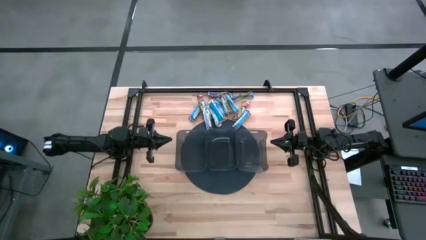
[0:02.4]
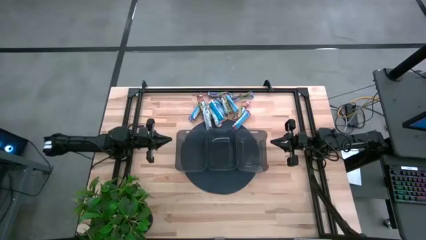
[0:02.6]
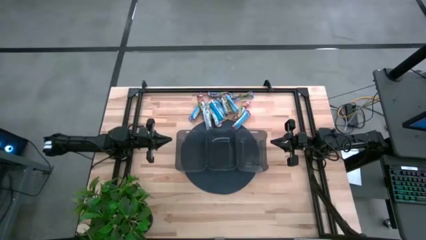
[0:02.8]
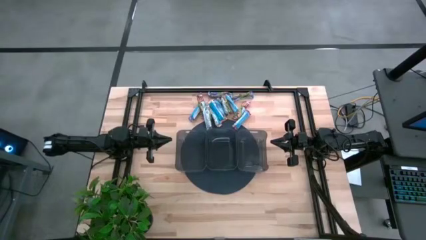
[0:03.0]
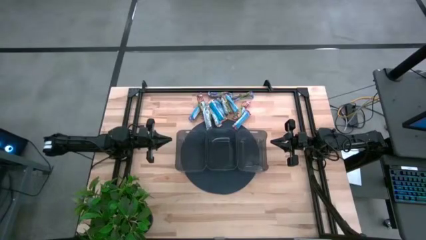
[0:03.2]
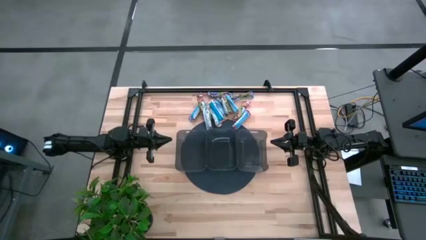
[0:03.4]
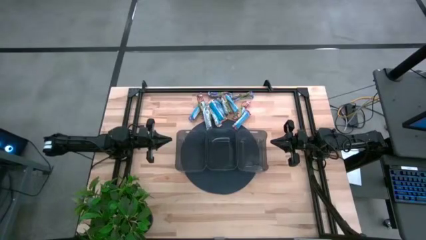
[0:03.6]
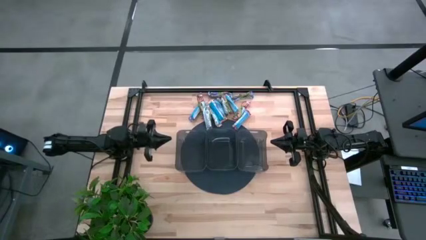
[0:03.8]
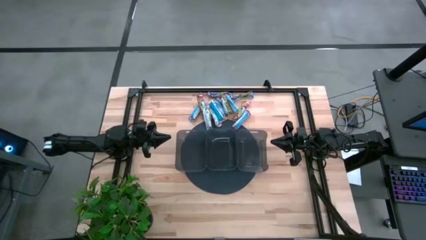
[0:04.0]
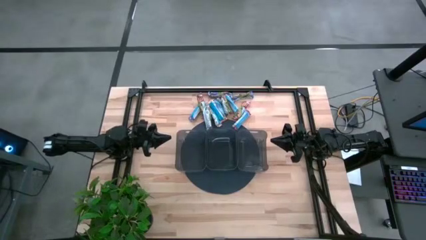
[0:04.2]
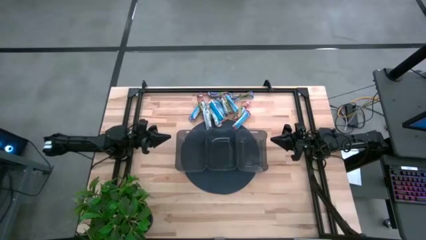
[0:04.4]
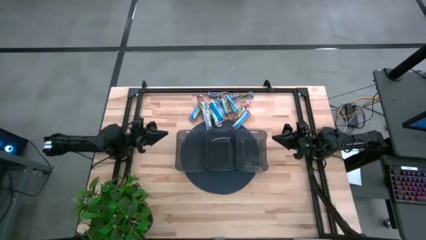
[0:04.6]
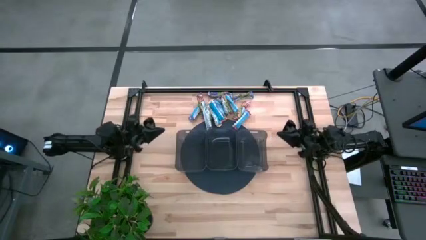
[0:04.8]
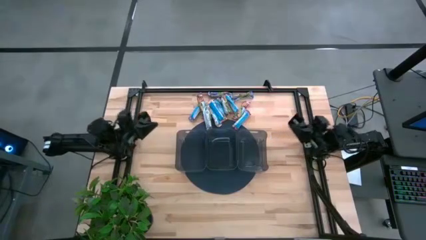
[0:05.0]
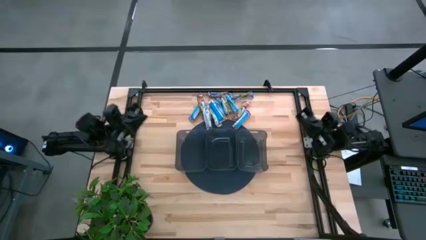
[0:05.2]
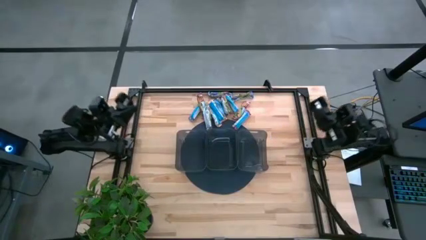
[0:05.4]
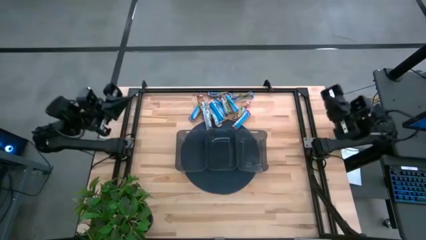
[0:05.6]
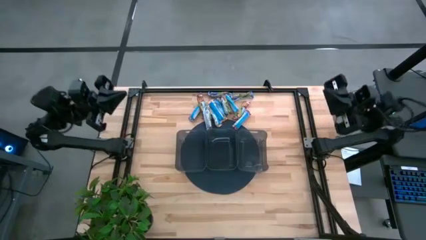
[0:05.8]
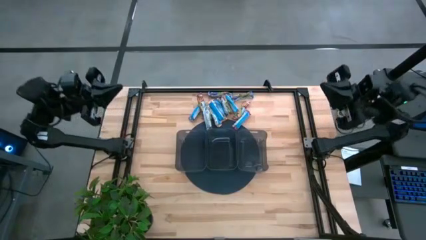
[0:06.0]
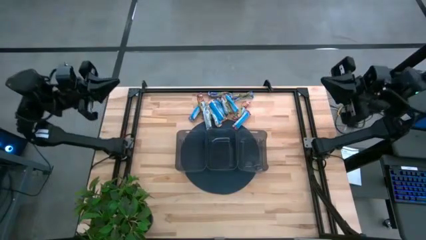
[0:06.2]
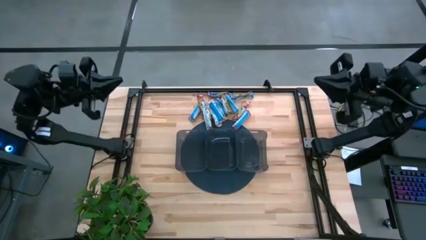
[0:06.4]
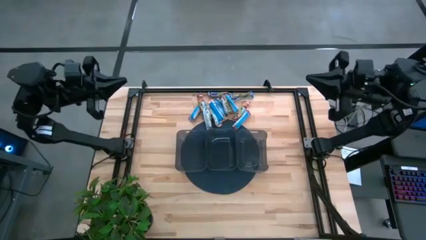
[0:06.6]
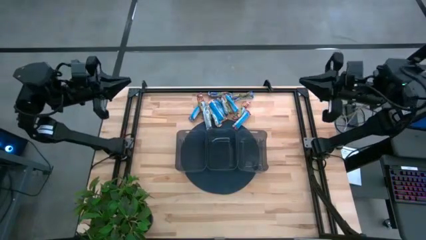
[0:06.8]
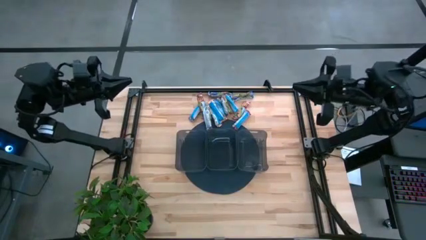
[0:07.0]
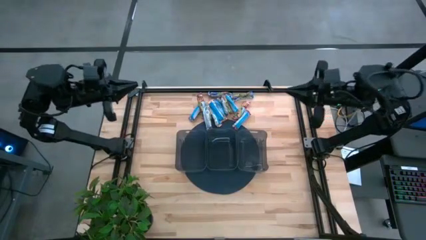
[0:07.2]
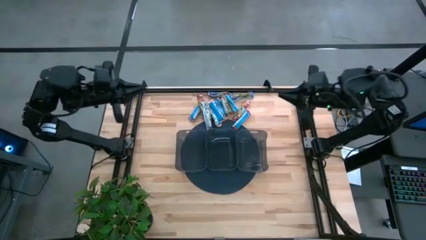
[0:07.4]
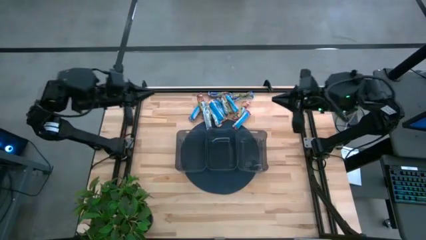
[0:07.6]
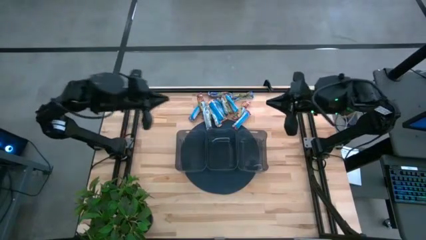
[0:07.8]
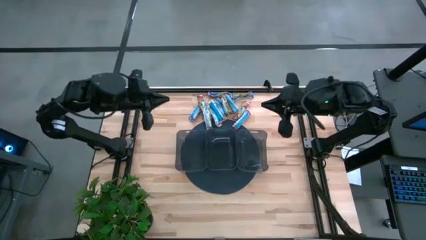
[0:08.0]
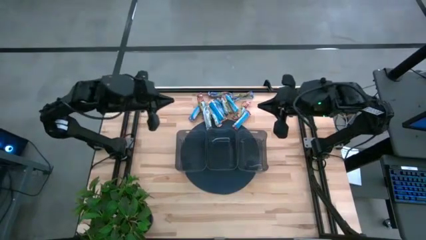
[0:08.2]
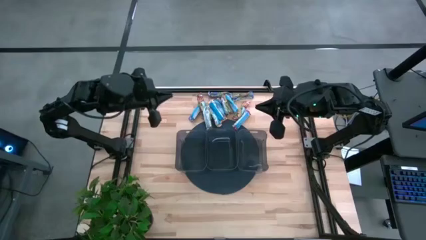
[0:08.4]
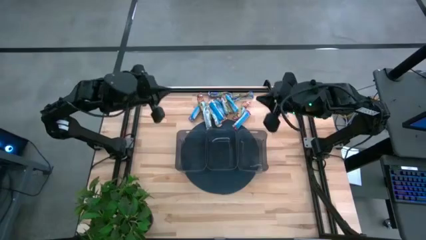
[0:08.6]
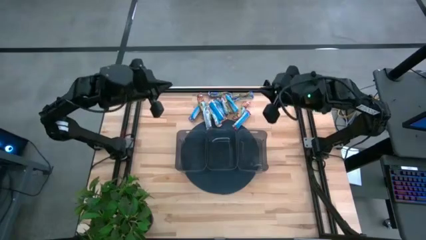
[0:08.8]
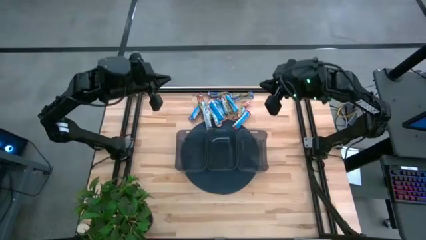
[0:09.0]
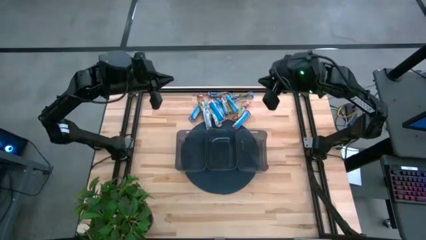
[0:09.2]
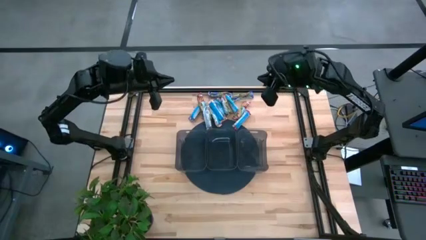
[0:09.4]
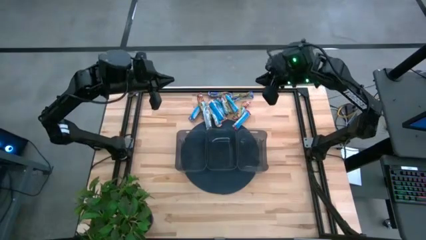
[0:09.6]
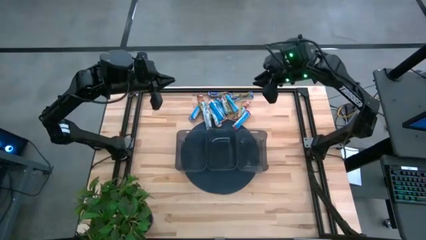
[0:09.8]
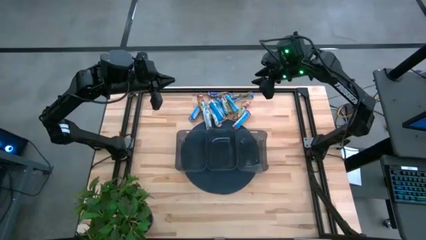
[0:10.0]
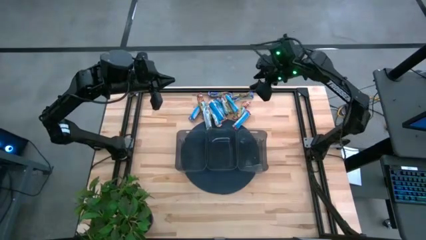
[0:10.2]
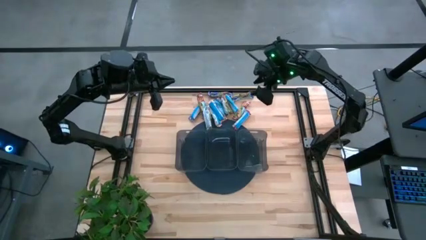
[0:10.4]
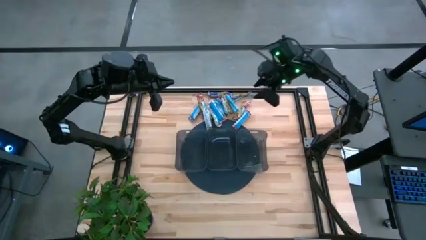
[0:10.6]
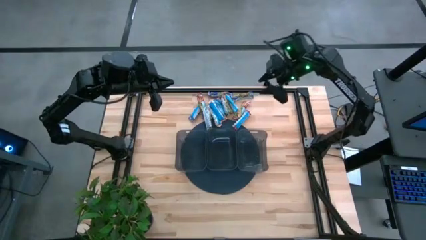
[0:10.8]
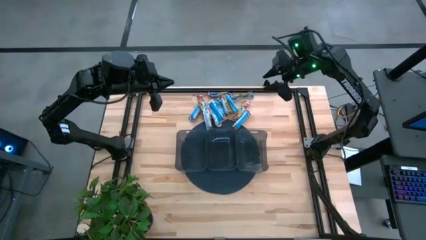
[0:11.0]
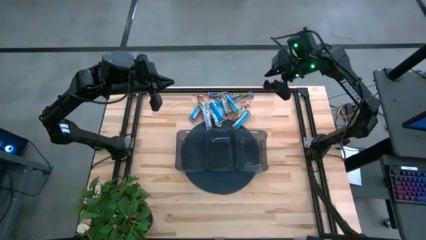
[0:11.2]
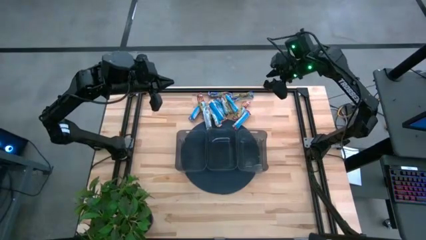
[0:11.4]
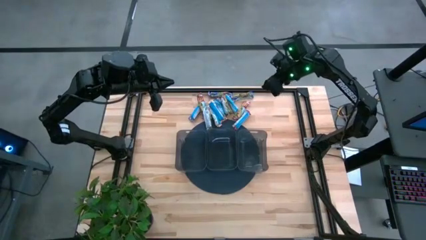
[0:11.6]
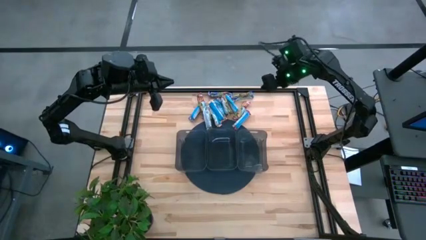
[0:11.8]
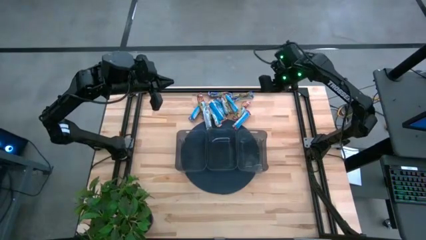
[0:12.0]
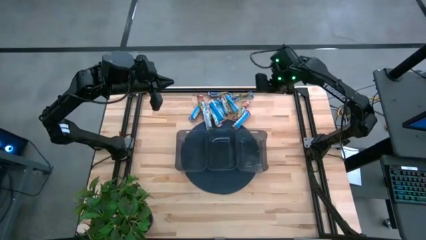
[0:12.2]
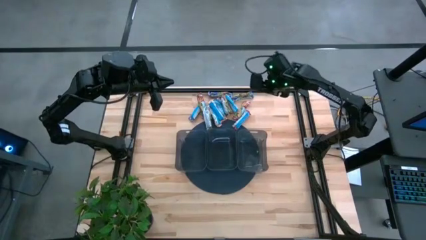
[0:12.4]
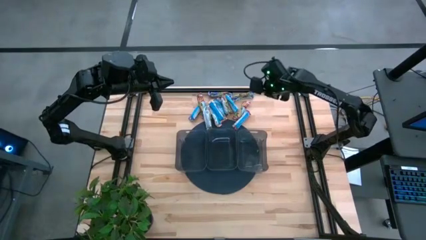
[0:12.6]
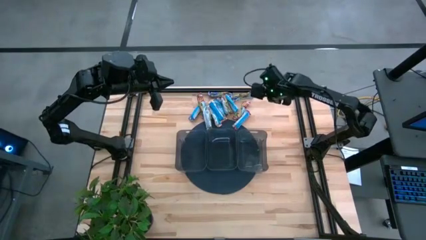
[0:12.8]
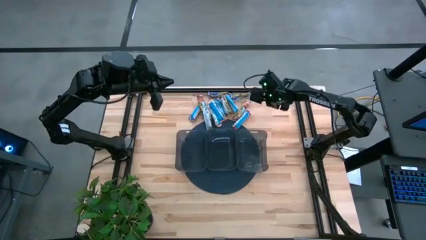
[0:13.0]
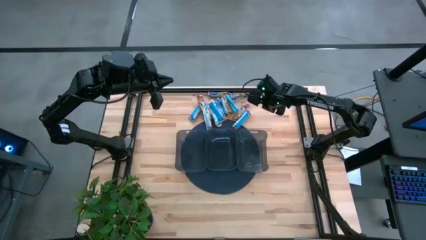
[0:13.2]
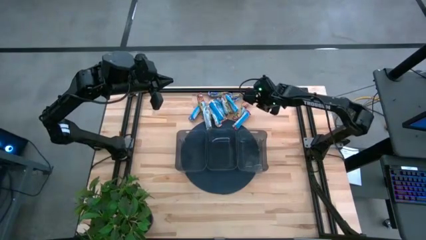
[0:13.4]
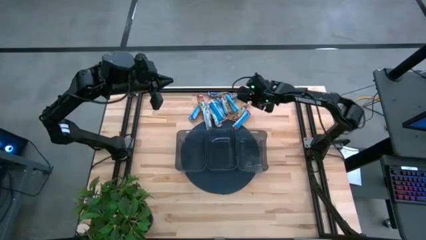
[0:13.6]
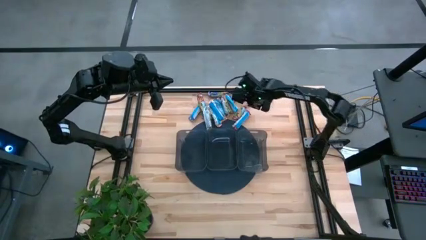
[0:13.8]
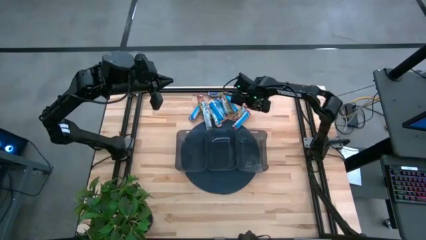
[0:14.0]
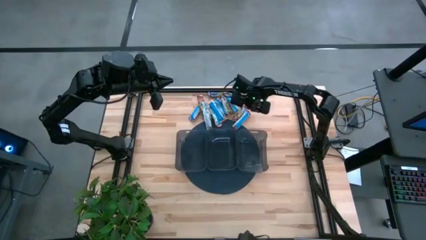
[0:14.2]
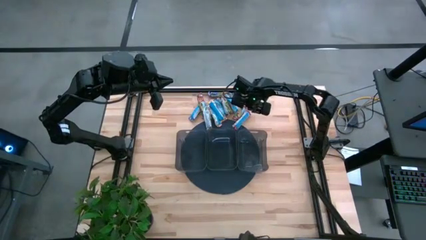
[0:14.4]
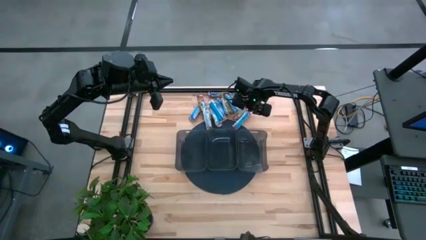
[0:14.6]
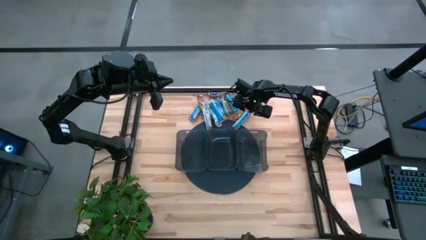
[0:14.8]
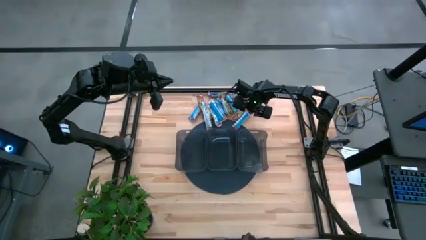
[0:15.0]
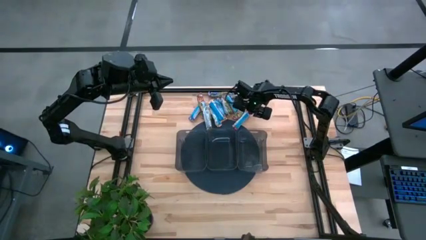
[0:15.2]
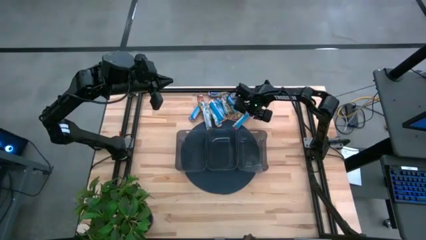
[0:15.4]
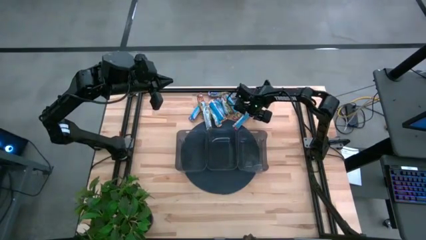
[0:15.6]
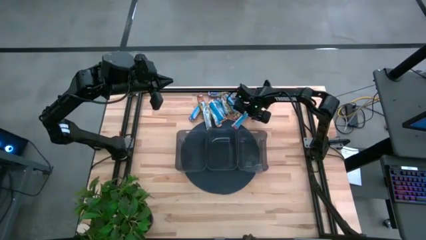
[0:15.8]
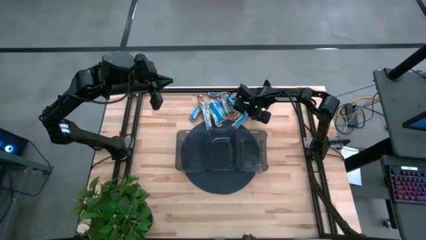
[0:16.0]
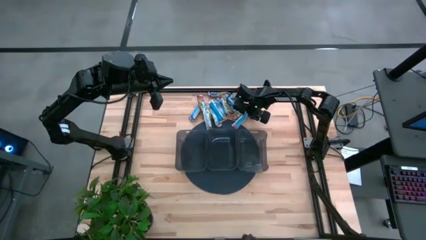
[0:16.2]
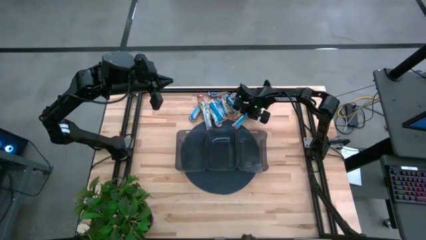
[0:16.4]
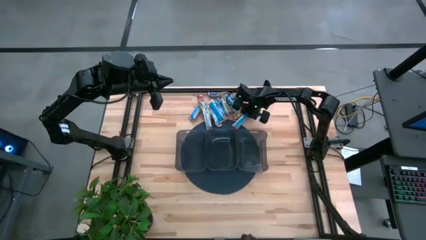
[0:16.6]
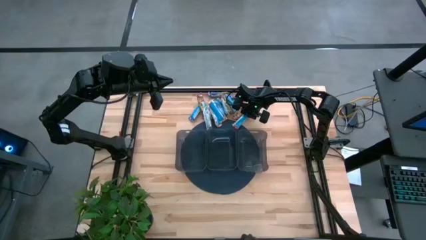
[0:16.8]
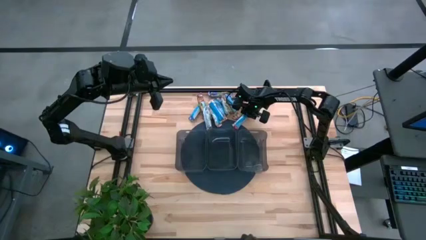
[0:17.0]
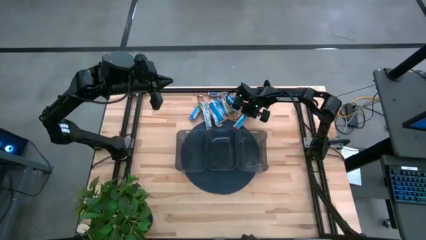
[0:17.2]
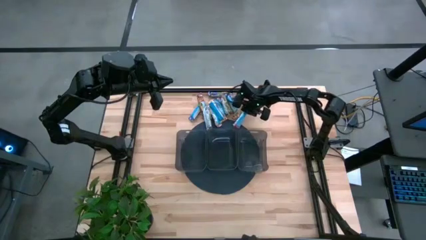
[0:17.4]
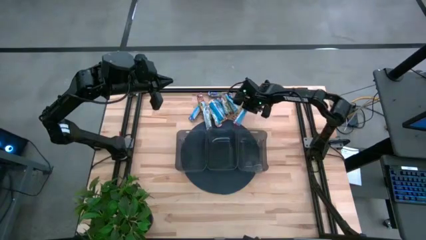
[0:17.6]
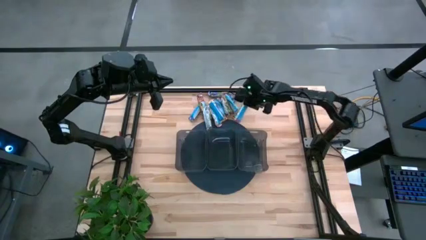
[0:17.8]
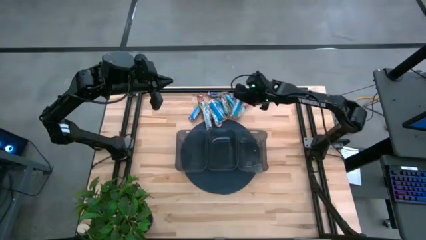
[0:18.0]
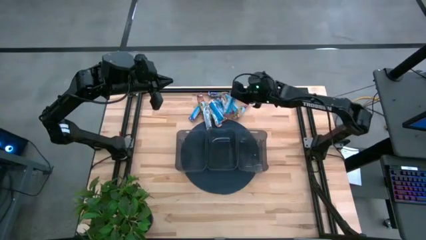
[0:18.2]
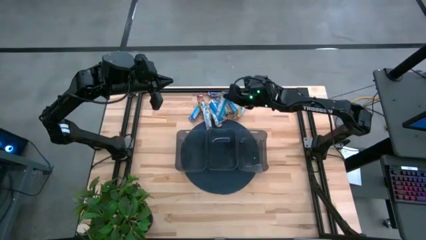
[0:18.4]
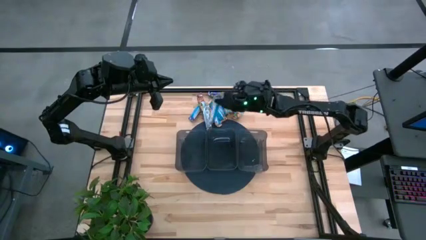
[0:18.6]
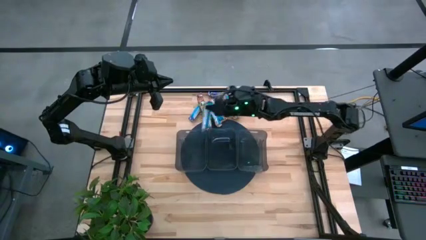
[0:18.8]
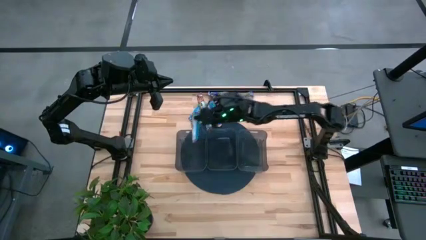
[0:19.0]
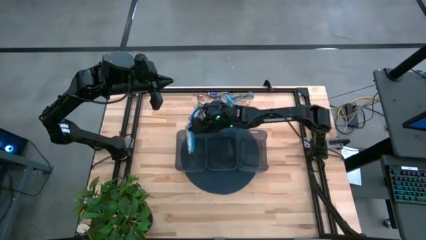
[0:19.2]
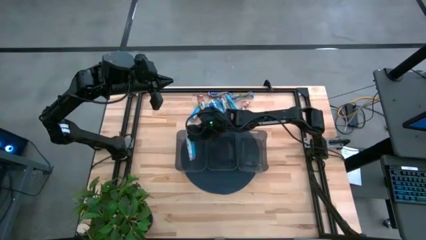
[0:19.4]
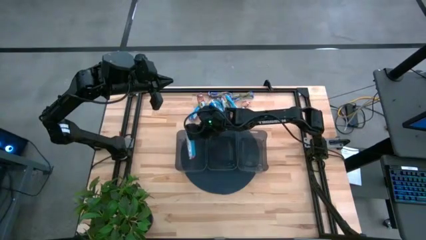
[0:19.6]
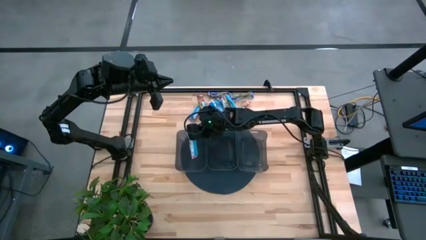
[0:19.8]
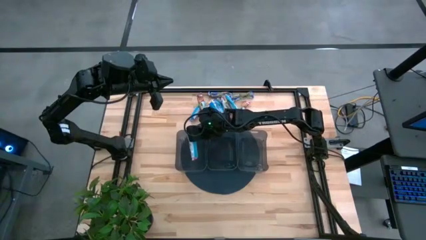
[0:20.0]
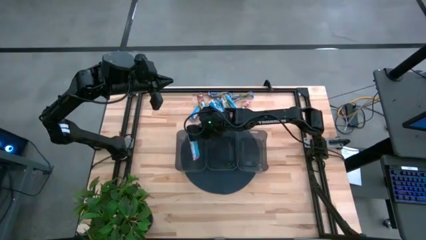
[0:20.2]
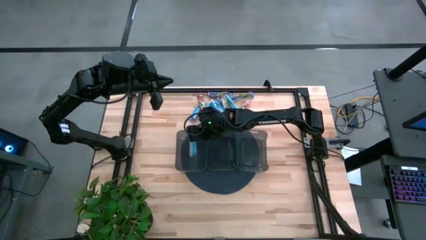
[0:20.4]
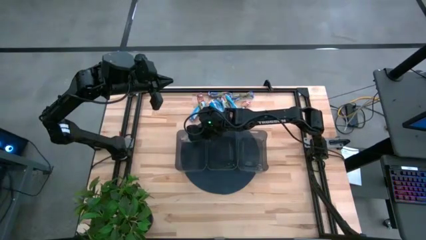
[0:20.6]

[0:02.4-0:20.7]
Task: Pick and place Granola Bars by type
Put the red granola bar into the left black bin
